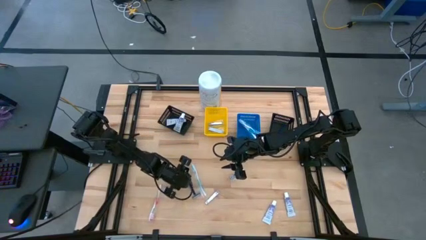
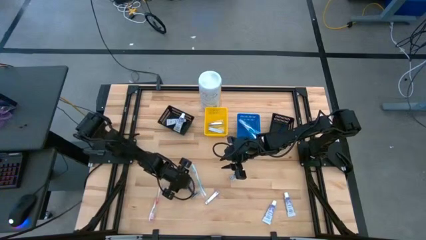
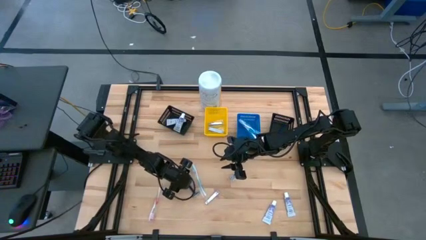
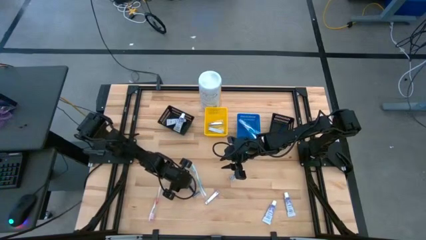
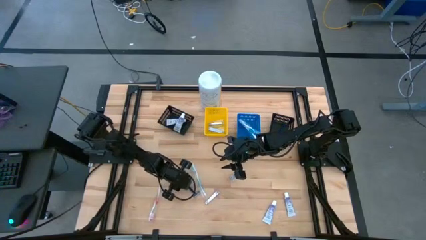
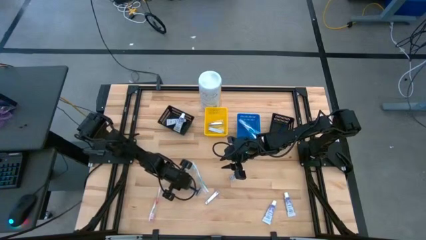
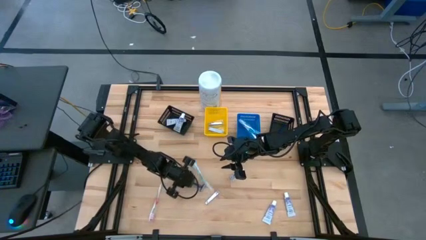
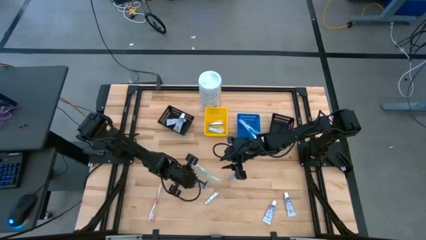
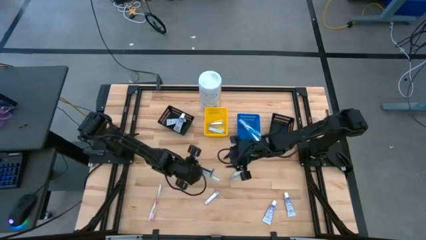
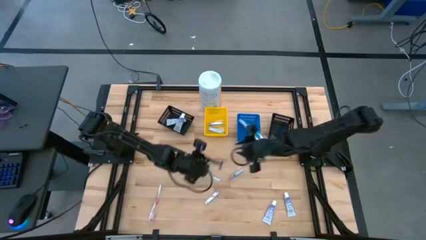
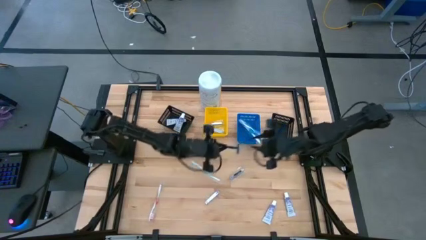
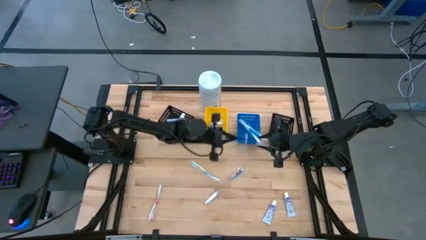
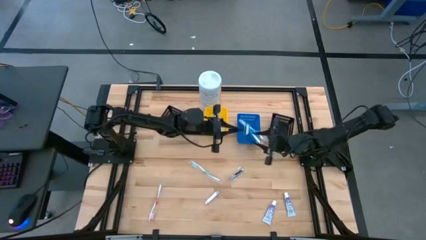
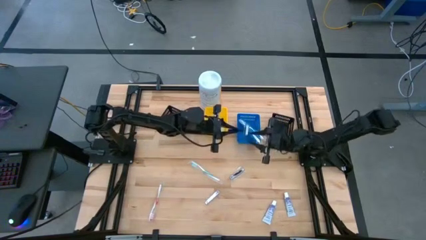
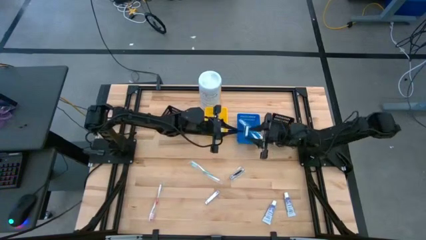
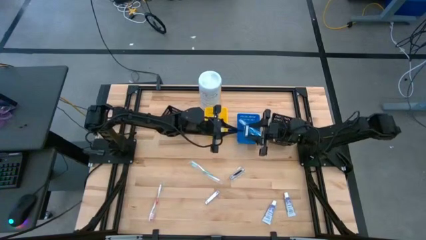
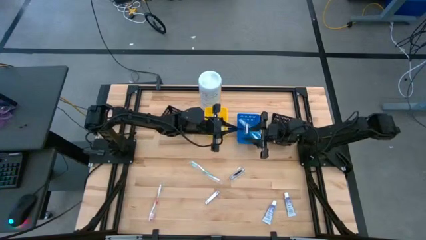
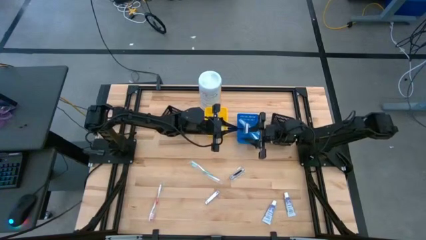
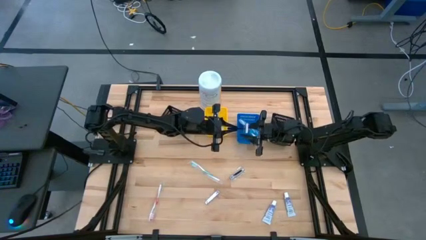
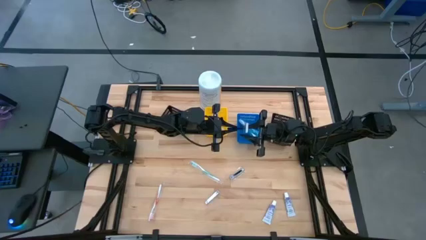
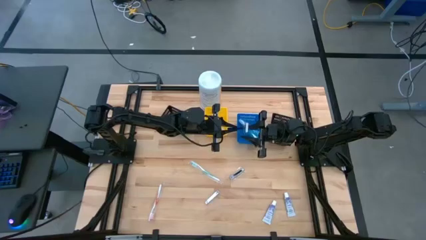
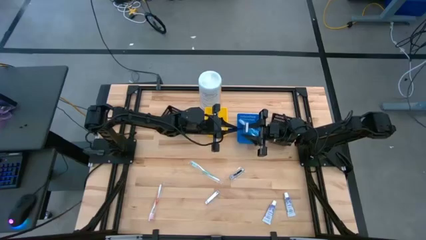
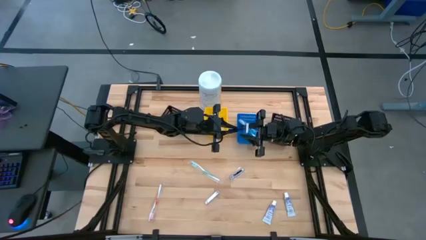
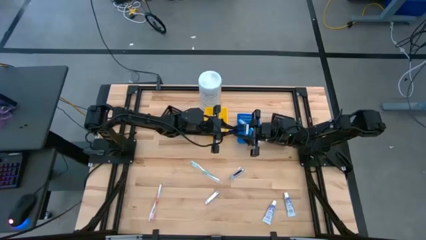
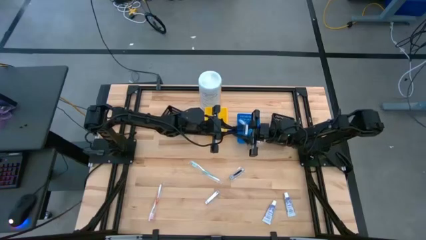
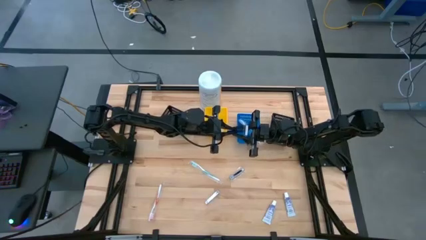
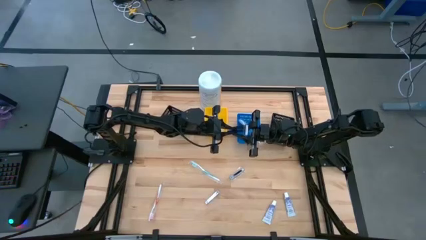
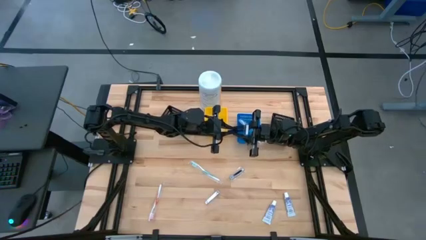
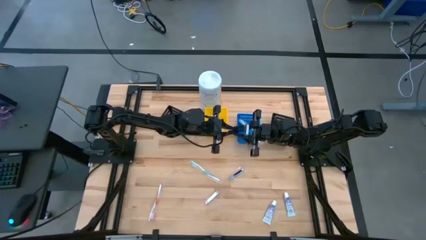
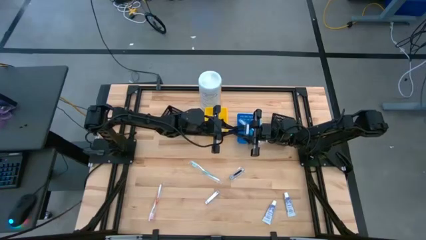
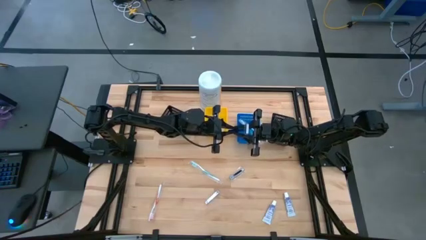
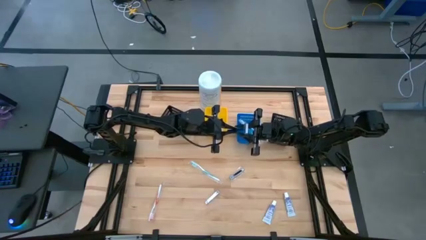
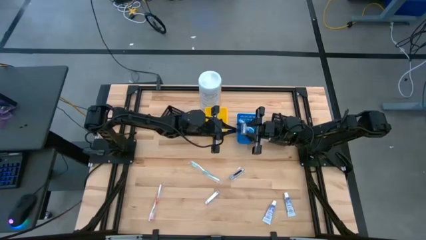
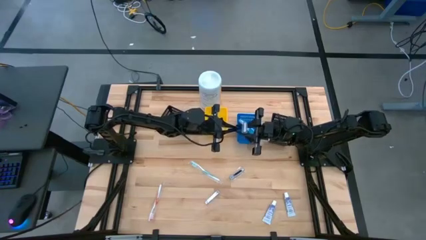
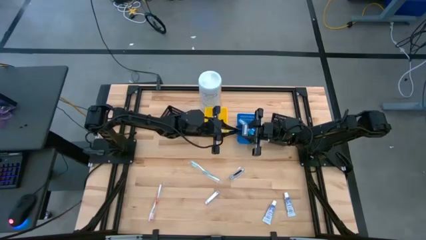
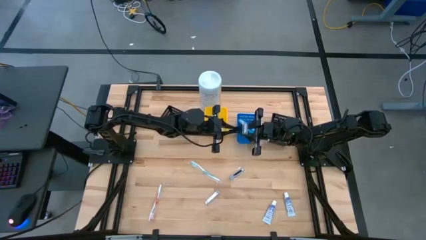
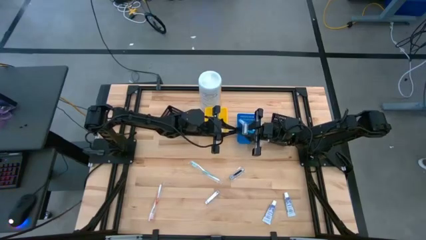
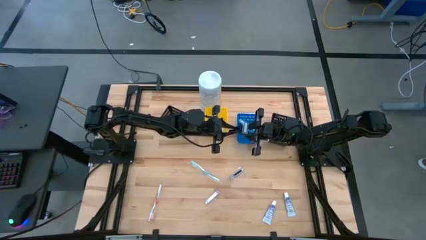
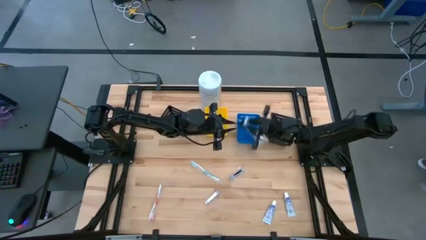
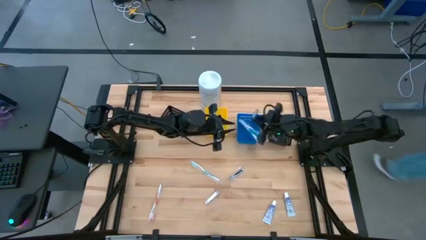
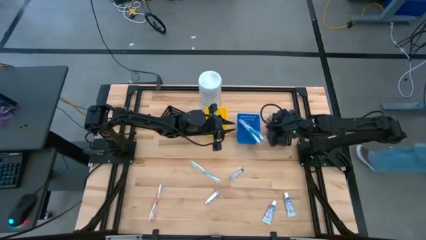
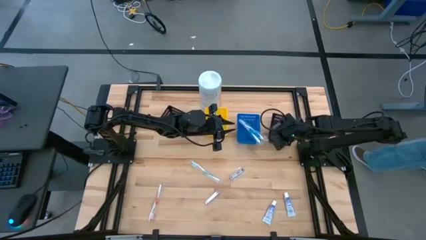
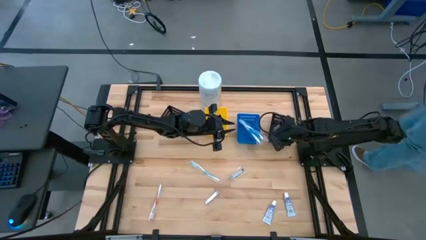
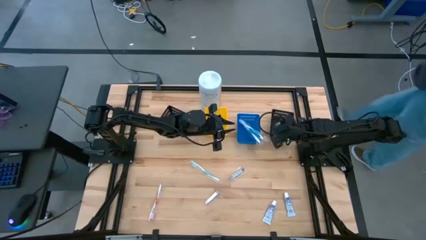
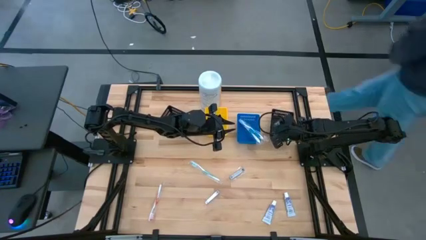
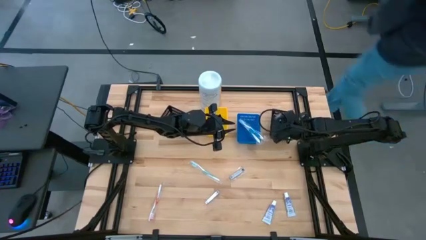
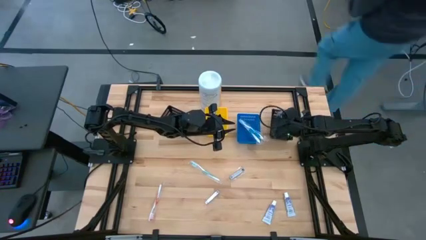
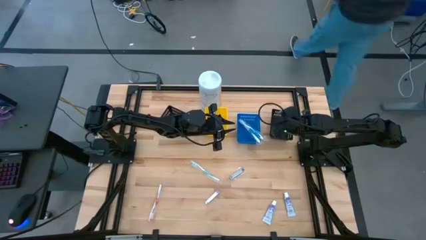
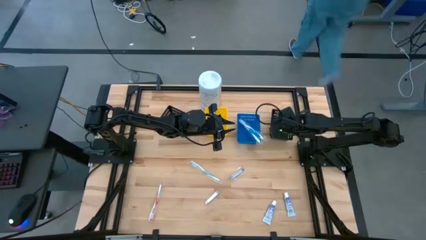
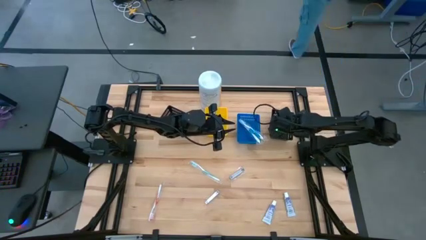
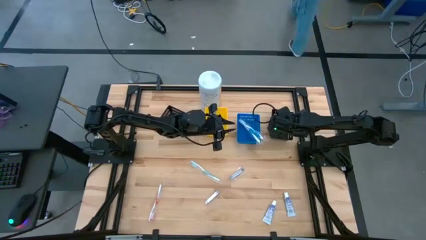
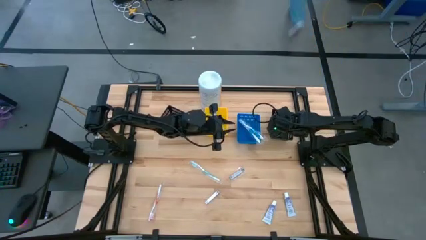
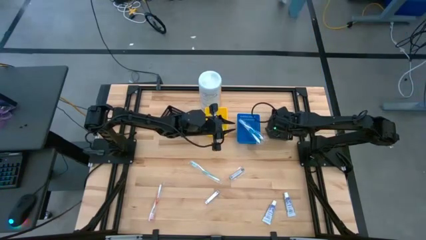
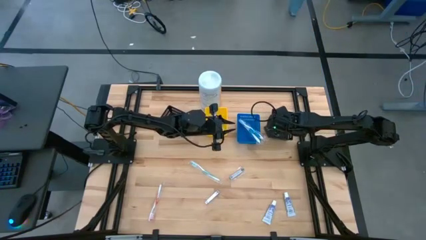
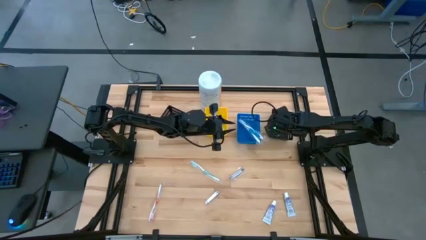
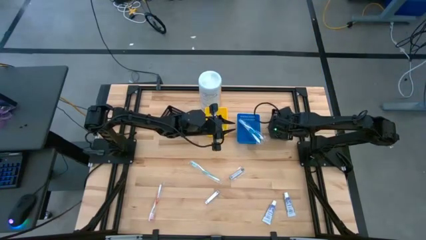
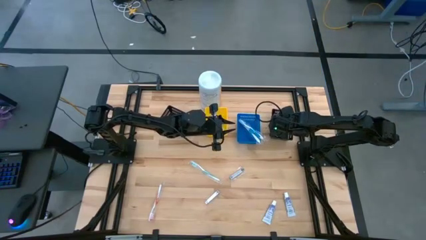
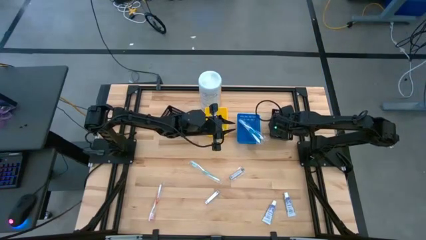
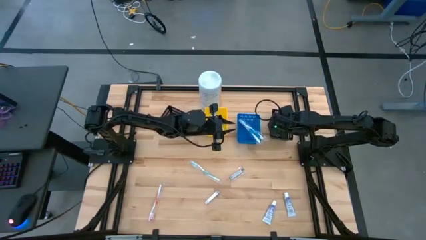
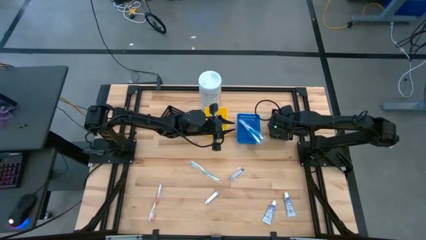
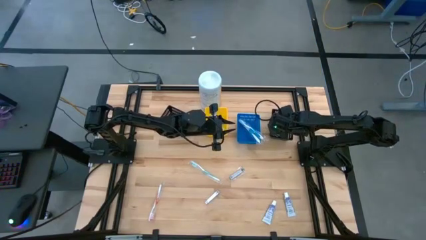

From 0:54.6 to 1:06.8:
Task: Pick & Place Travel size toiletries
Put the blue razor into the right black bin
